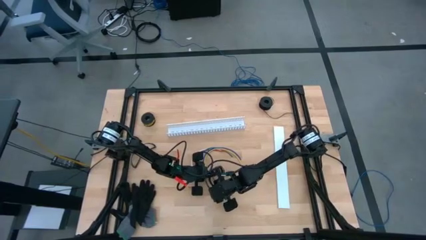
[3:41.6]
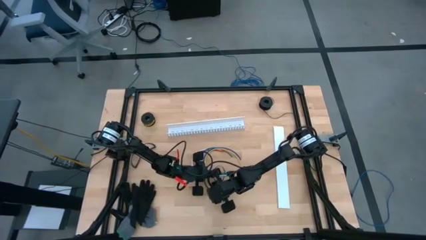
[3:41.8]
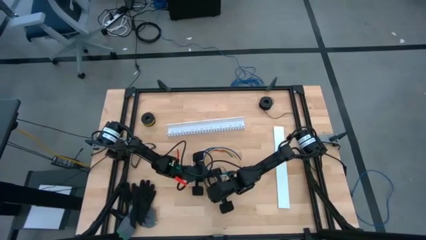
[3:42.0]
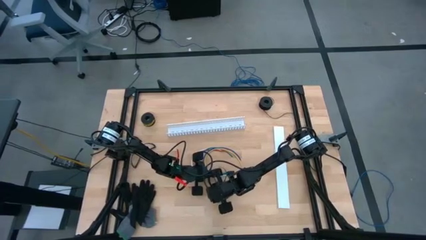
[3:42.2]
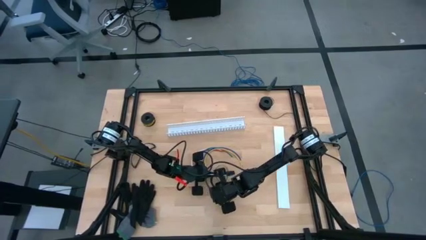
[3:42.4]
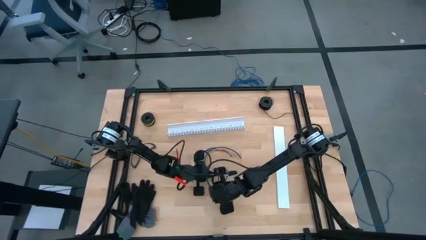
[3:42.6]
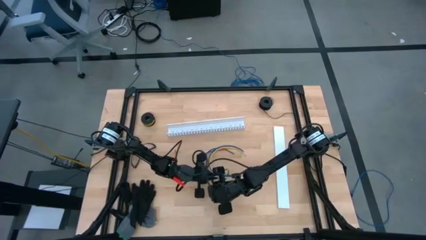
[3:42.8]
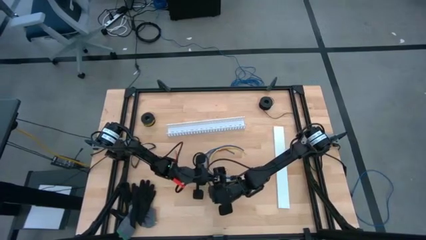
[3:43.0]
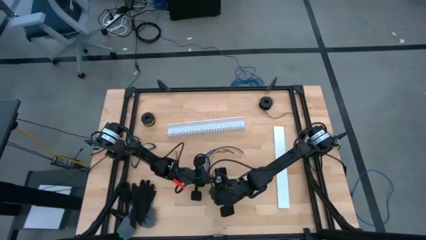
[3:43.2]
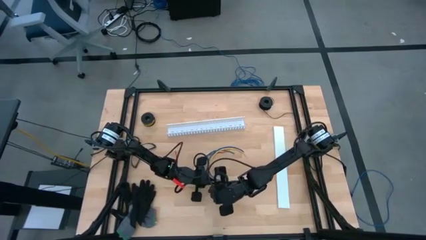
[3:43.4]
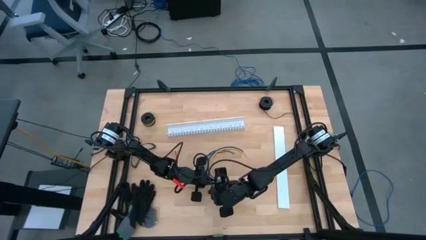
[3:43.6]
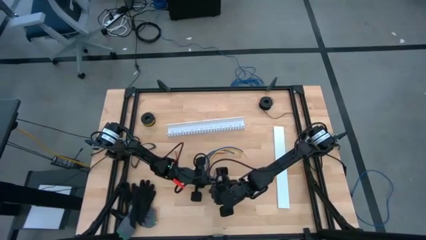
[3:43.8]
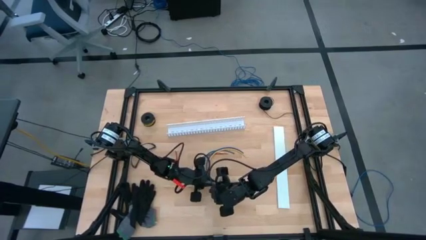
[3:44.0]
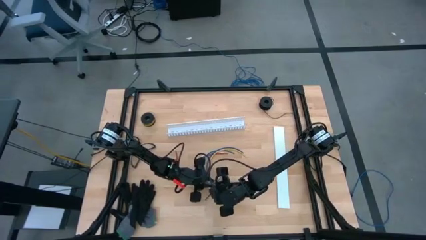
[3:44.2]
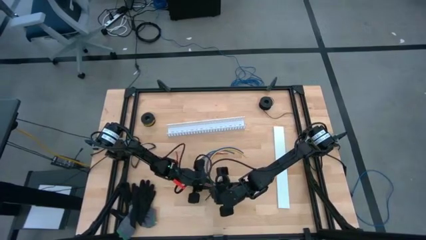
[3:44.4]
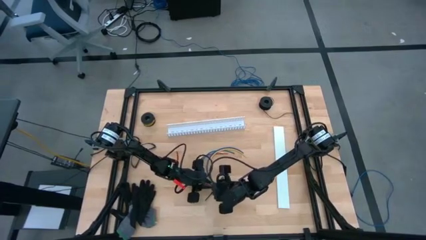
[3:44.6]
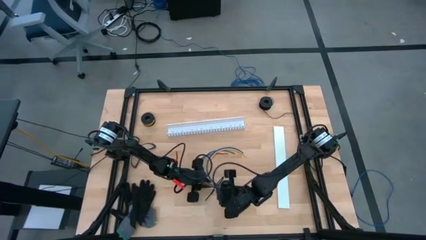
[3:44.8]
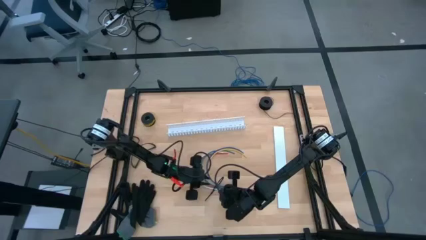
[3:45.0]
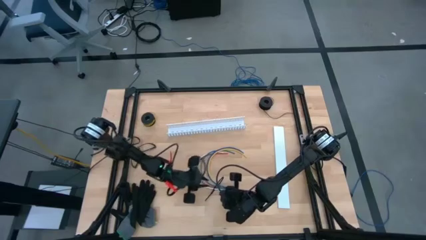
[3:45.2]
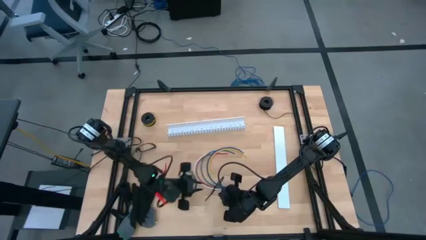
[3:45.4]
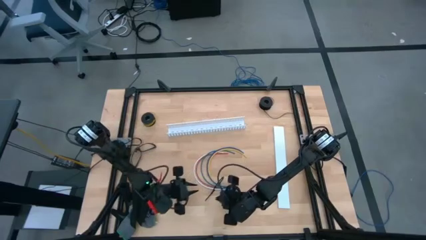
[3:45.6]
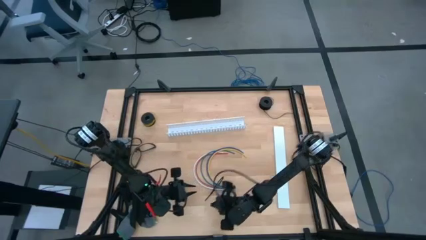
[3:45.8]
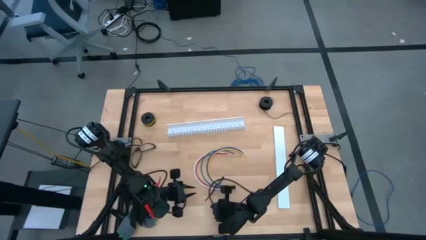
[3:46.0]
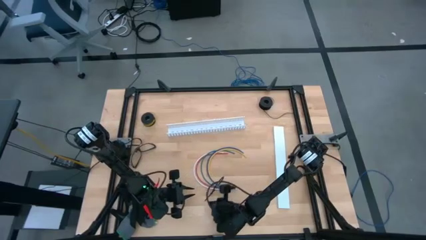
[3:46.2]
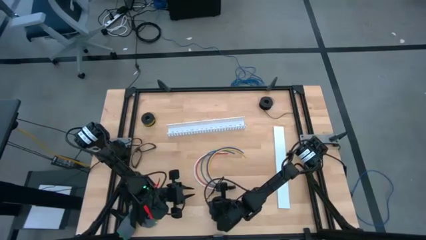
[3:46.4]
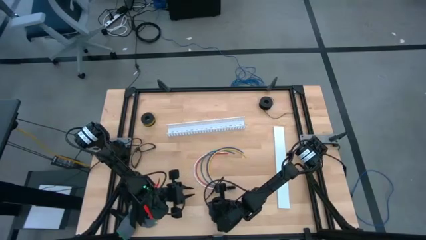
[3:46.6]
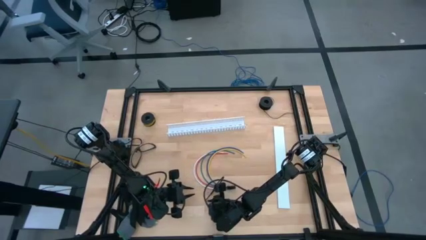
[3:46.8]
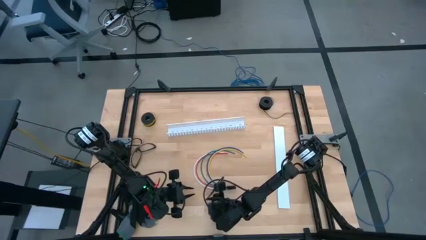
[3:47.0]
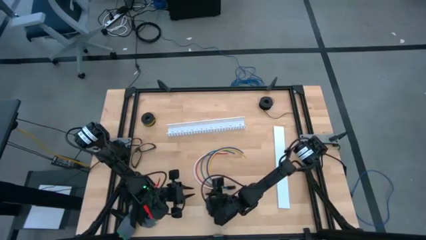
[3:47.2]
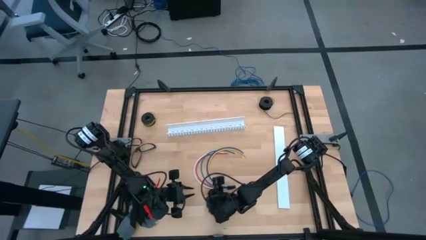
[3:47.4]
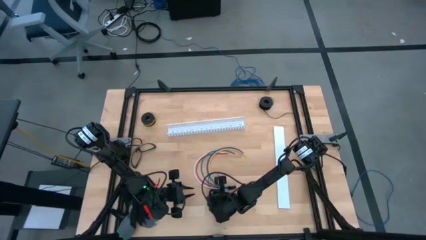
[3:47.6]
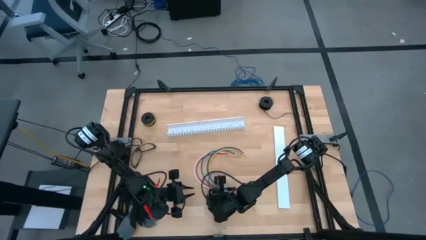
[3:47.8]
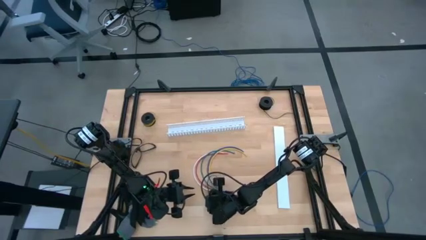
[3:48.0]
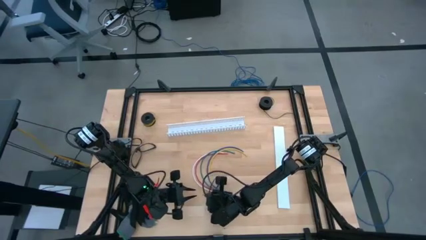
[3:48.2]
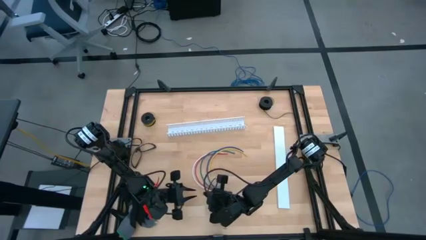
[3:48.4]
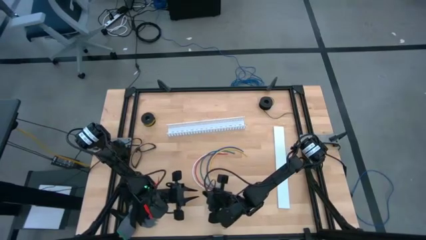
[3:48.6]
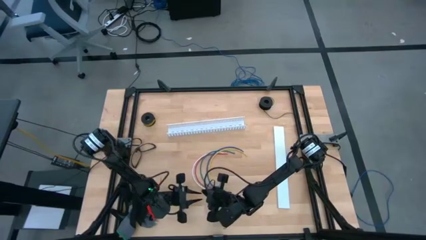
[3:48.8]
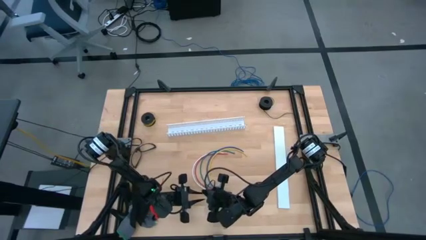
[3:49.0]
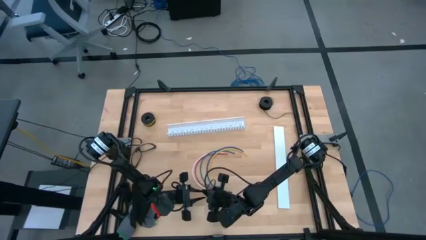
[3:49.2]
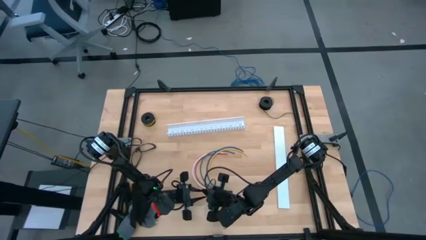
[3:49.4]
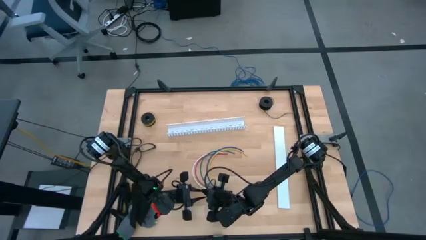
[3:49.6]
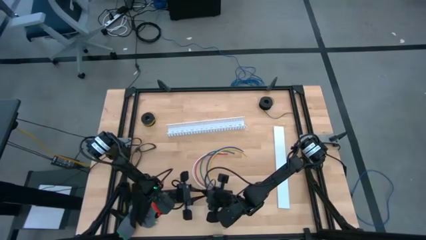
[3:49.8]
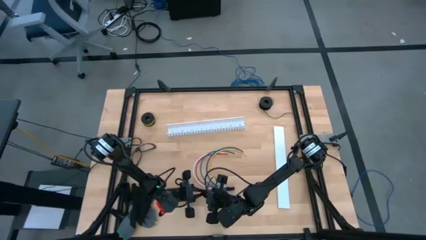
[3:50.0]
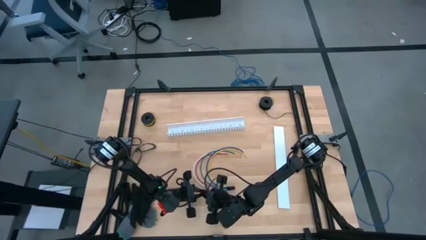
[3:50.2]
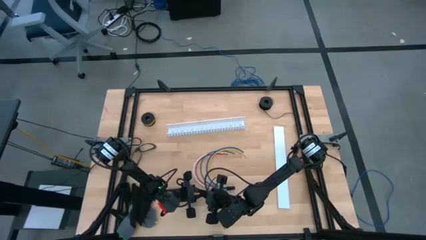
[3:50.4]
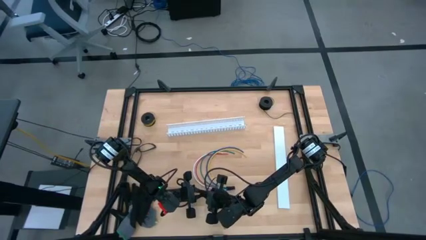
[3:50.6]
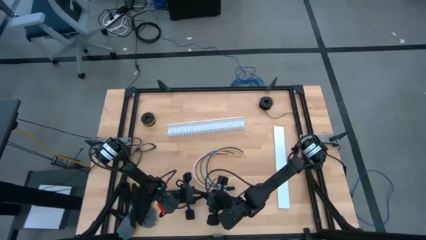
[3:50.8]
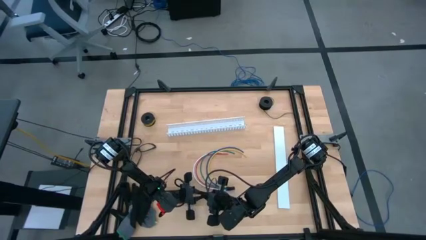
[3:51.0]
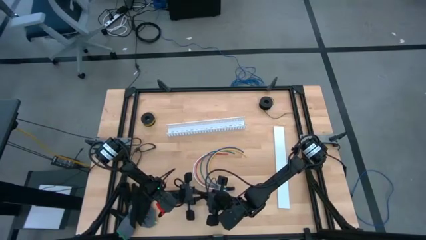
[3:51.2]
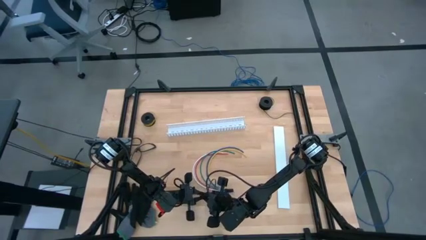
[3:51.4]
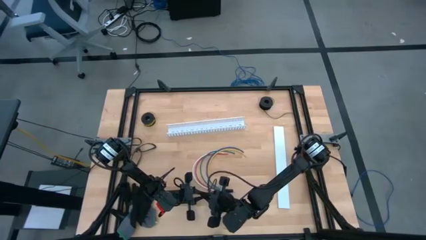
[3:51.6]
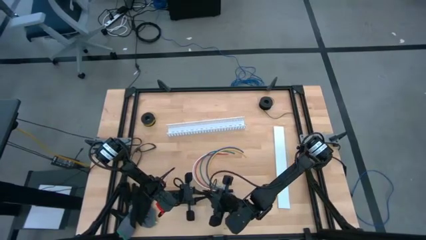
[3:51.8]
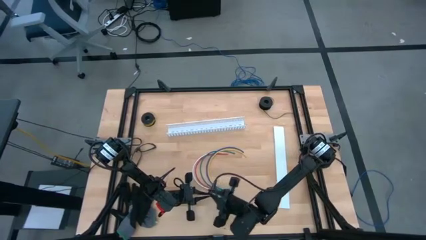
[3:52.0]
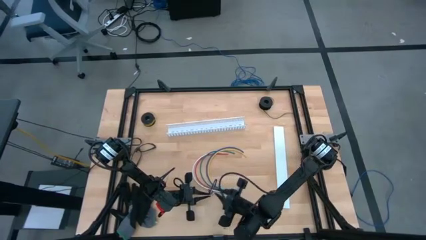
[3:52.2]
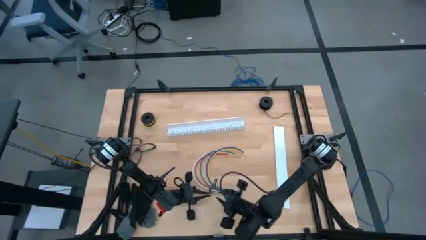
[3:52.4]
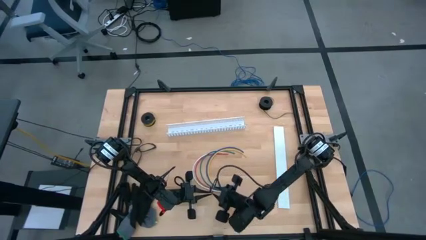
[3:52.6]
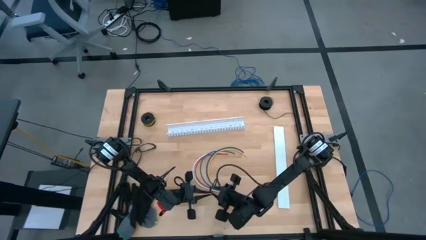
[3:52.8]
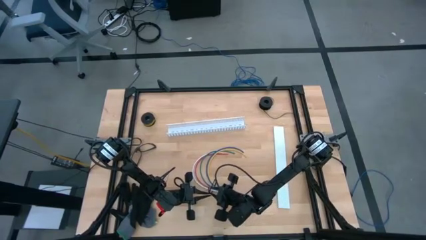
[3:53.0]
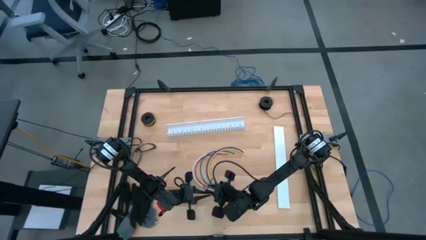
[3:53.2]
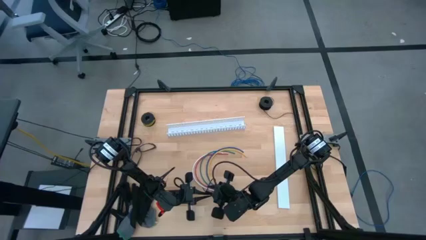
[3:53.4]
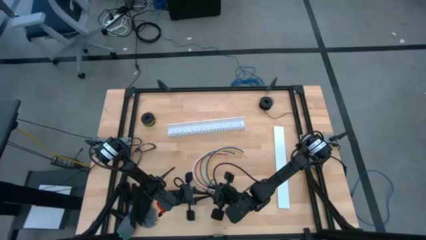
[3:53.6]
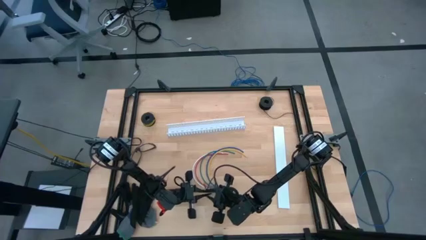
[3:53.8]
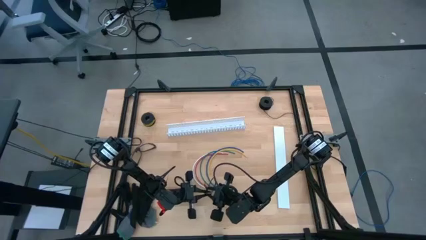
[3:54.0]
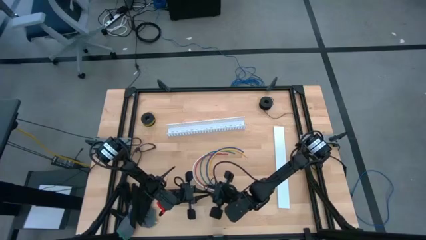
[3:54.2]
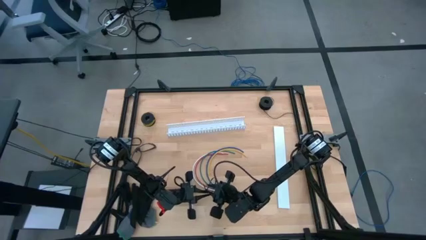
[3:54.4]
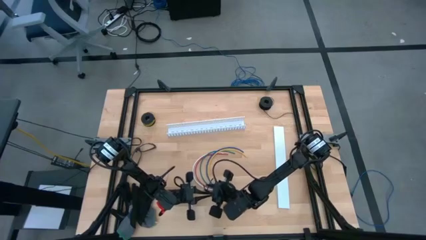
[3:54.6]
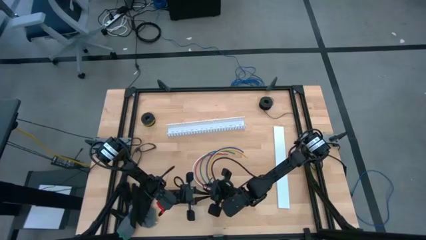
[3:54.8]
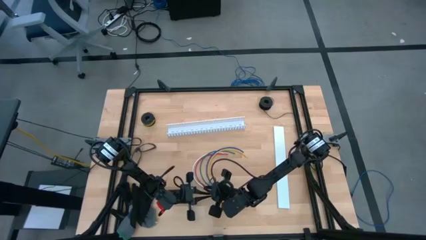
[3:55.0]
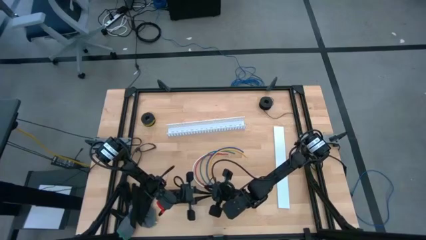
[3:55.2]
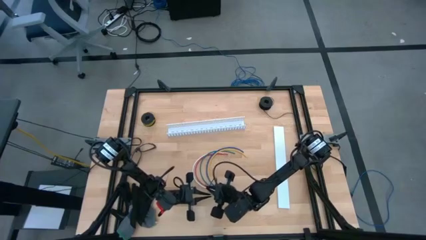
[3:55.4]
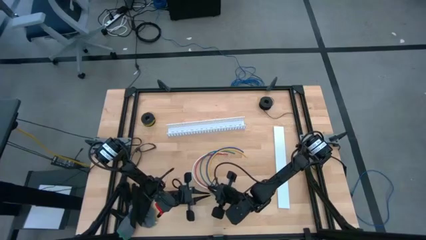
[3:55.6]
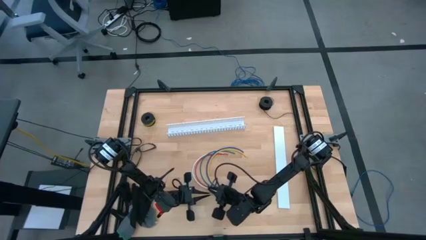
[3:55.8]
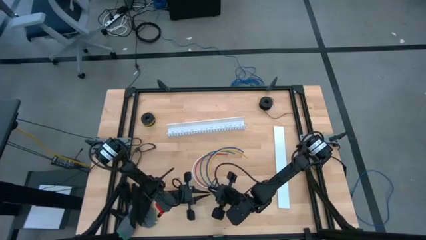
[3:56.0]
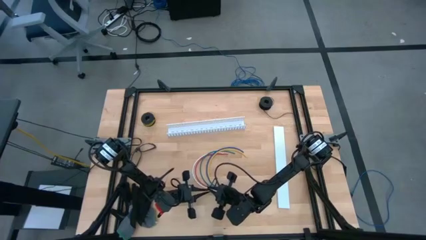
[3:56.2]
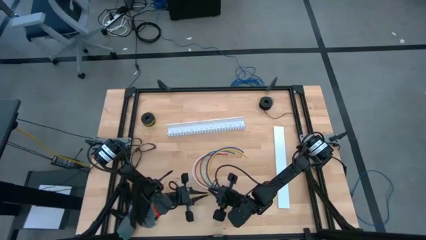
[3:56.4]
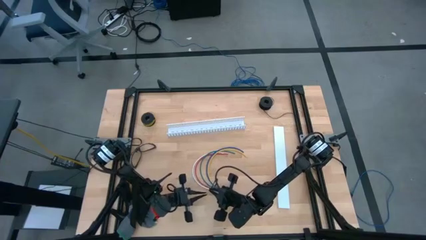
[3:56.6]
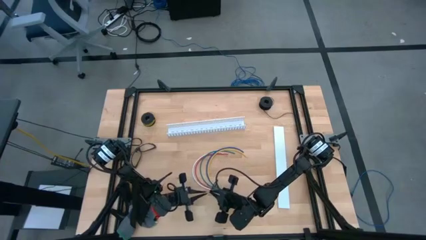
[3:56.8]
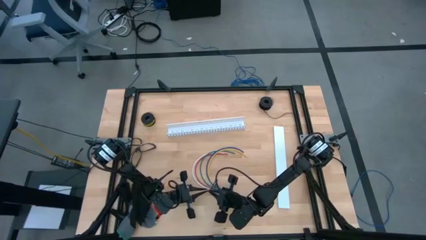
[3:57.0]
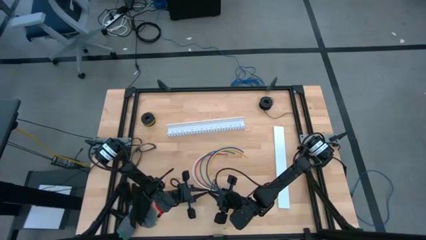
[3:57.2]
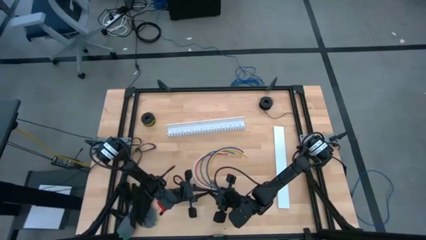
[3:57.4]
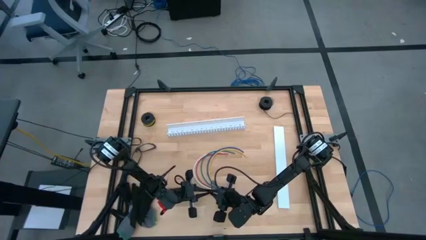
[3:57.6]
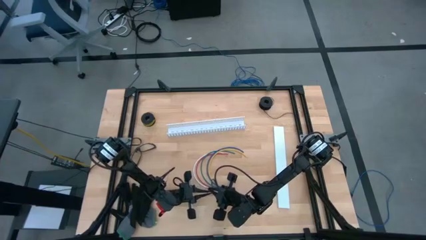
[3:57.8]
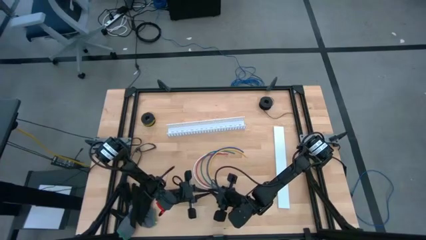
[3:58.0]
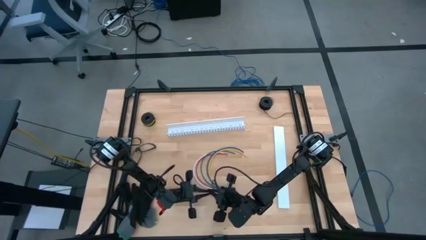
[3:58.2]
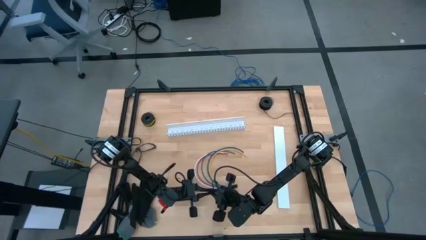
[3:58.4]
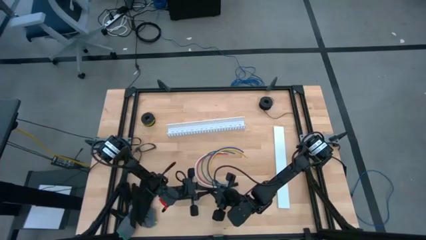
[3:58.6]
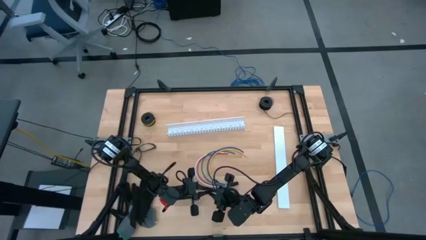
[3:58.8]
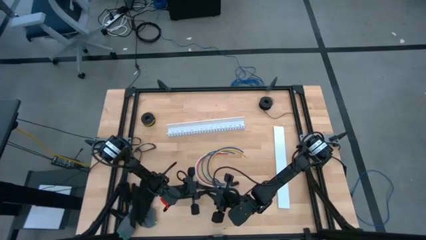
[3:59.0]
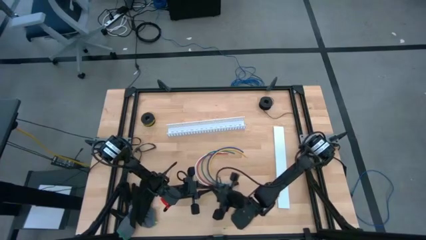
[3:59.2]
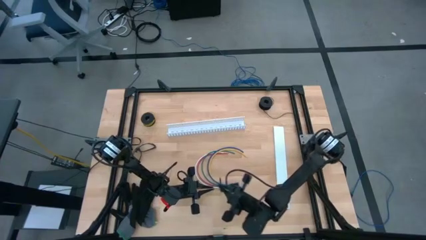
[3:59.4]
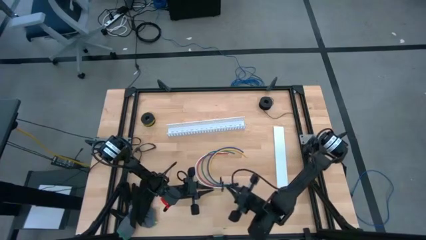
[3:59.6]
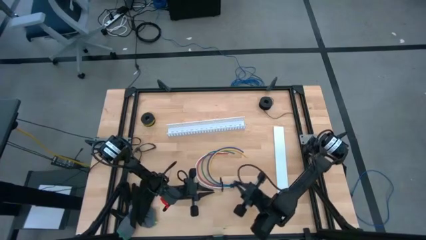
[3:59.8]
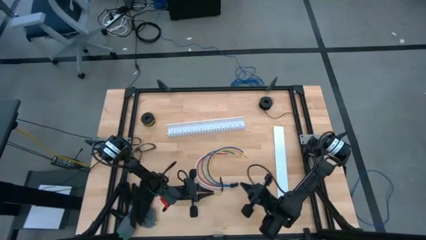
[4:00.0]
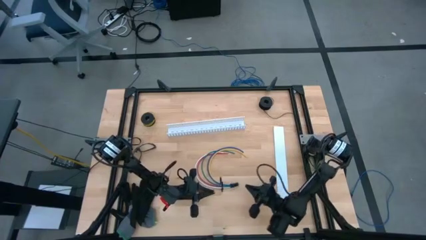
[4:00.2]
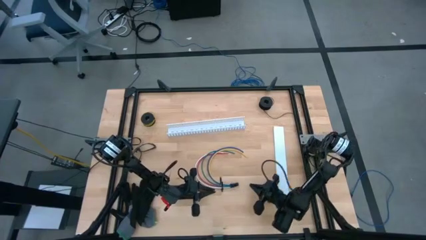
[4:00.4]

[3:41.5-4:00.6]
Task: Ziptie cables
Insert zip tie on the cable wire
